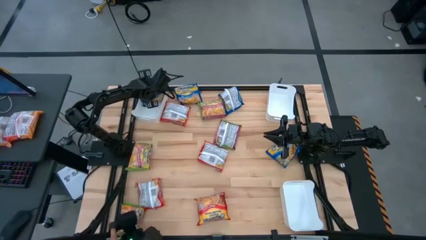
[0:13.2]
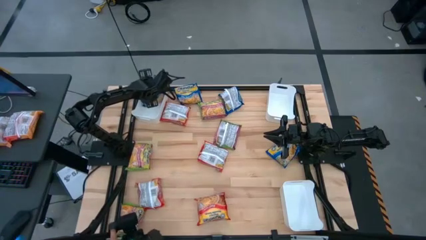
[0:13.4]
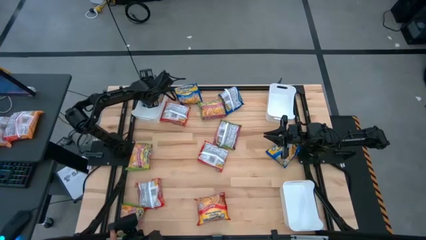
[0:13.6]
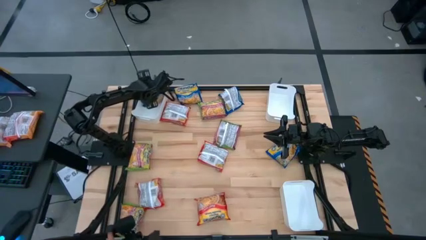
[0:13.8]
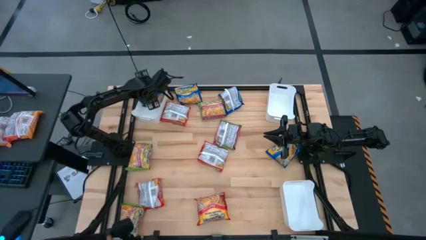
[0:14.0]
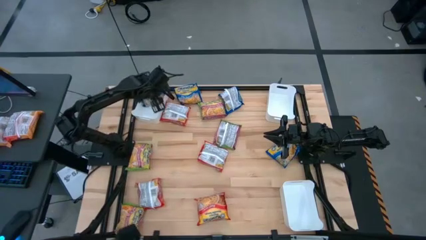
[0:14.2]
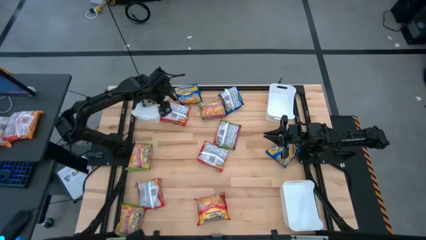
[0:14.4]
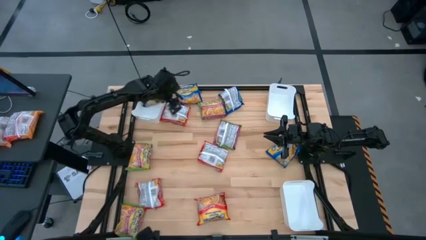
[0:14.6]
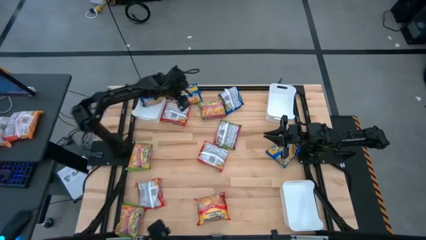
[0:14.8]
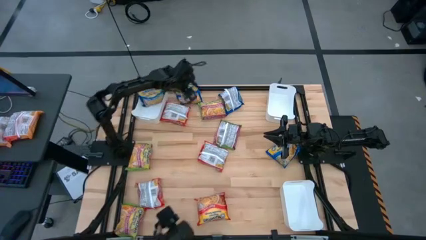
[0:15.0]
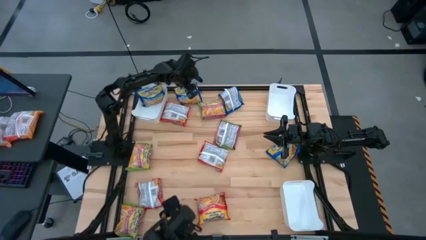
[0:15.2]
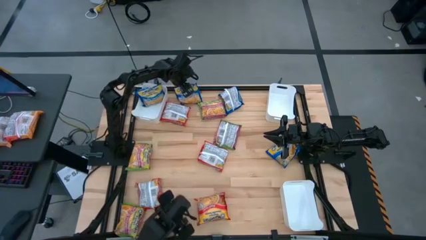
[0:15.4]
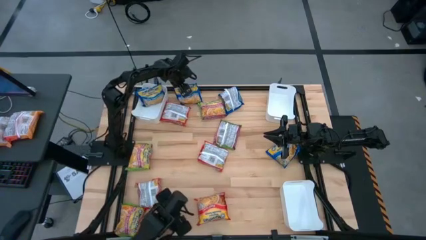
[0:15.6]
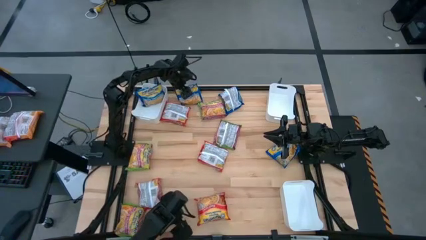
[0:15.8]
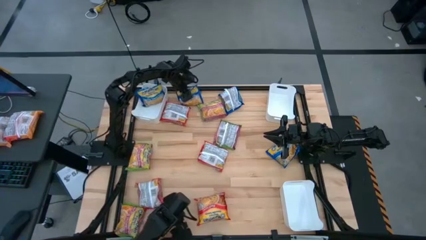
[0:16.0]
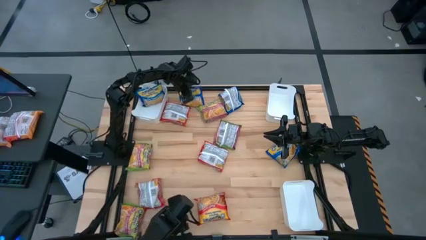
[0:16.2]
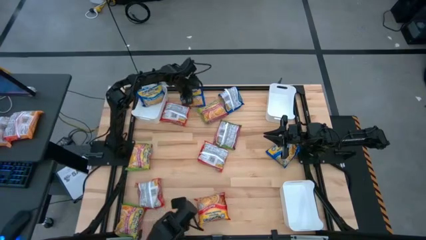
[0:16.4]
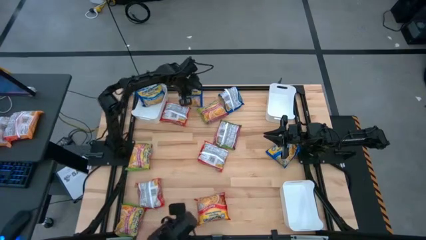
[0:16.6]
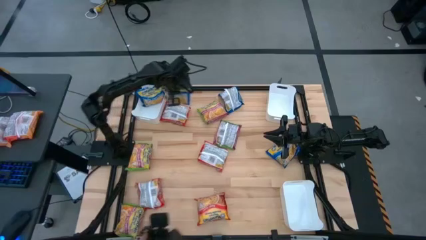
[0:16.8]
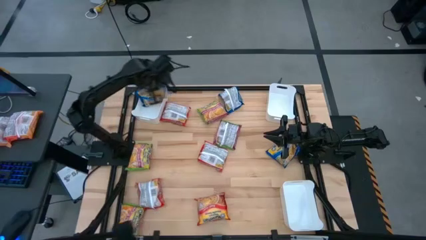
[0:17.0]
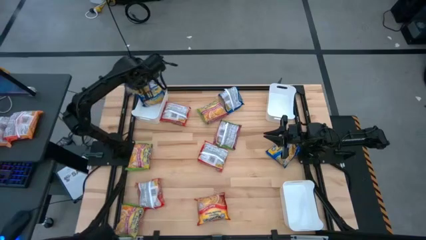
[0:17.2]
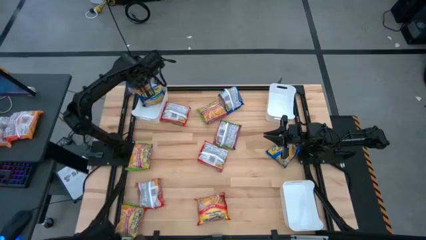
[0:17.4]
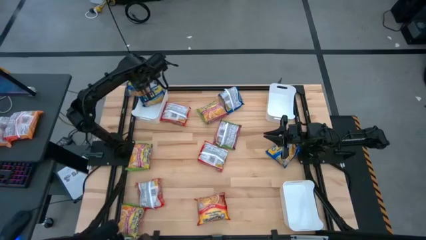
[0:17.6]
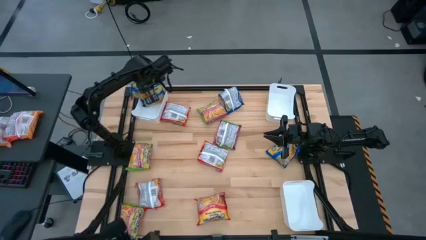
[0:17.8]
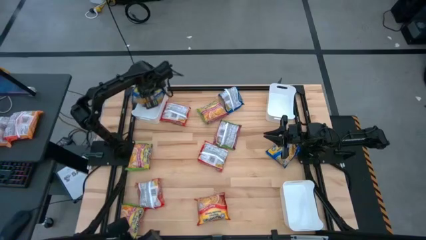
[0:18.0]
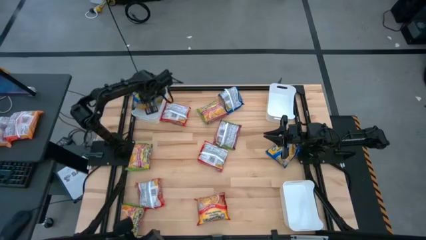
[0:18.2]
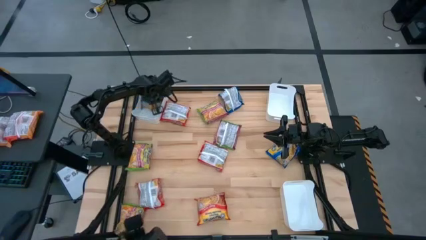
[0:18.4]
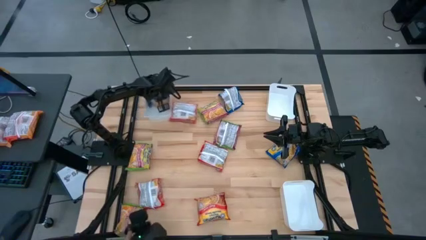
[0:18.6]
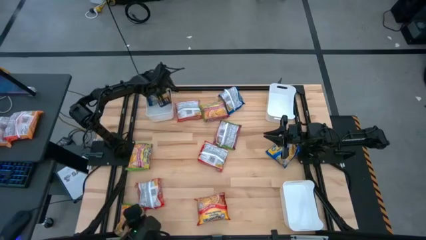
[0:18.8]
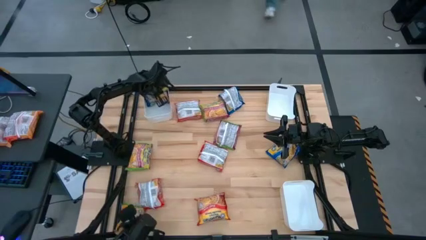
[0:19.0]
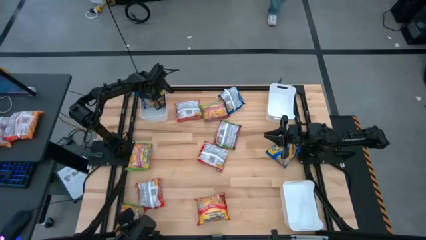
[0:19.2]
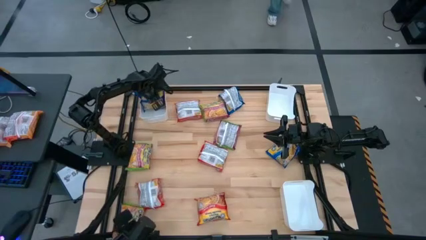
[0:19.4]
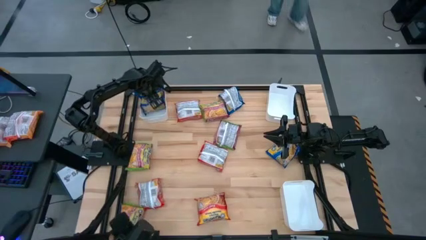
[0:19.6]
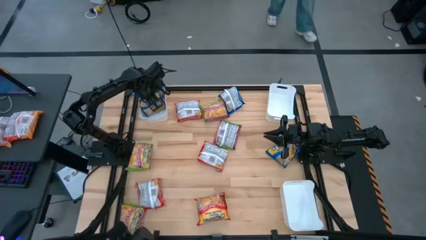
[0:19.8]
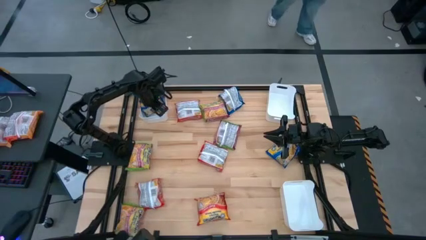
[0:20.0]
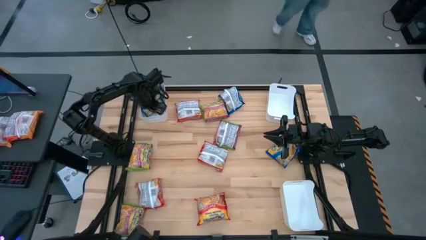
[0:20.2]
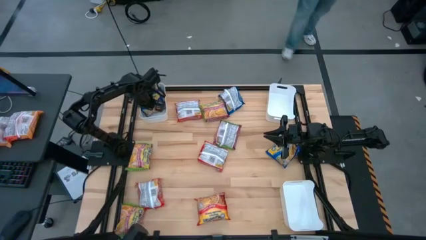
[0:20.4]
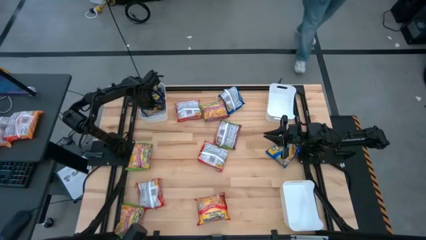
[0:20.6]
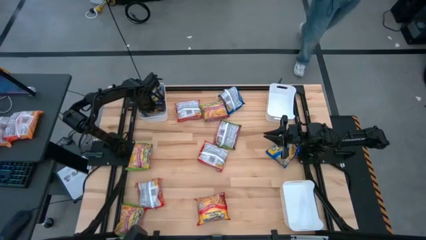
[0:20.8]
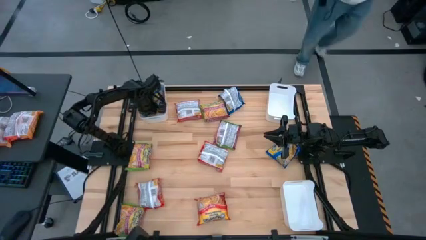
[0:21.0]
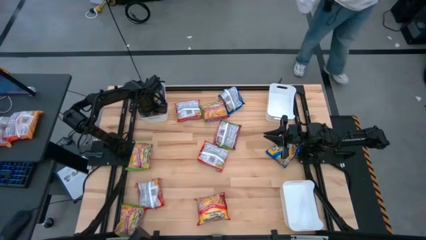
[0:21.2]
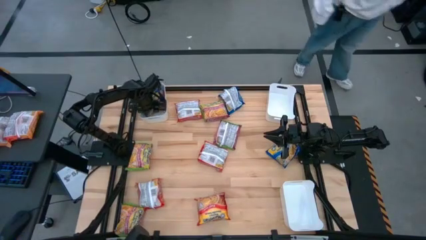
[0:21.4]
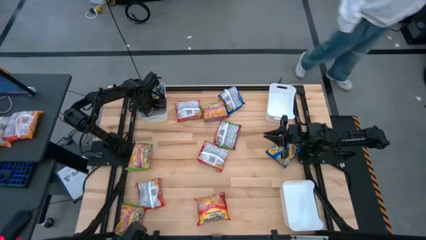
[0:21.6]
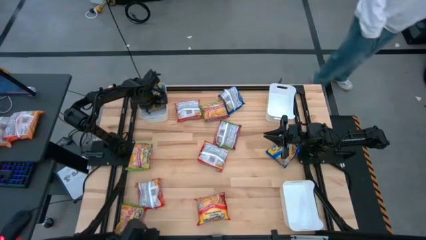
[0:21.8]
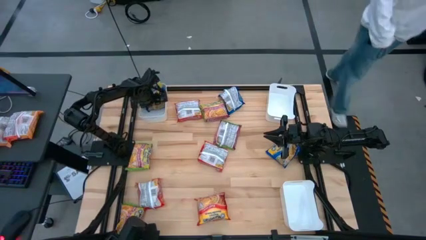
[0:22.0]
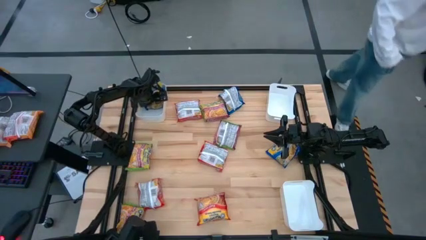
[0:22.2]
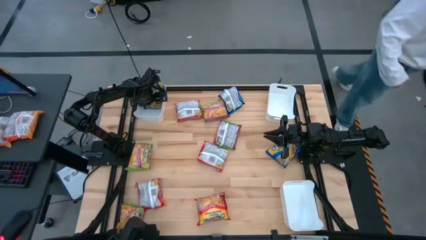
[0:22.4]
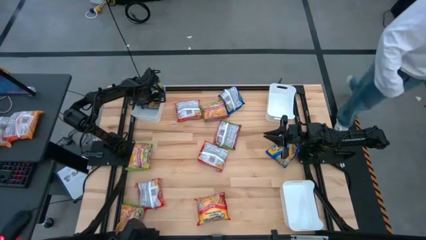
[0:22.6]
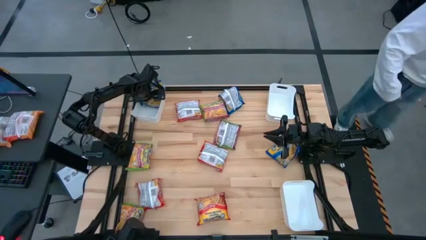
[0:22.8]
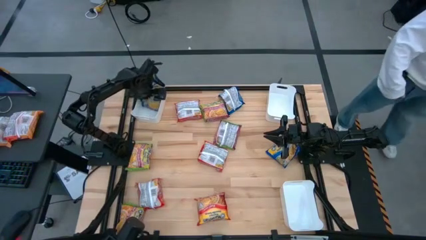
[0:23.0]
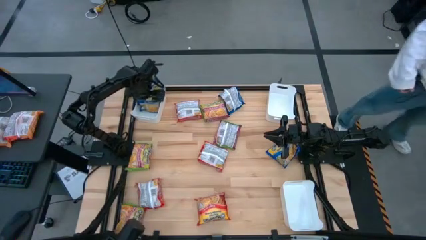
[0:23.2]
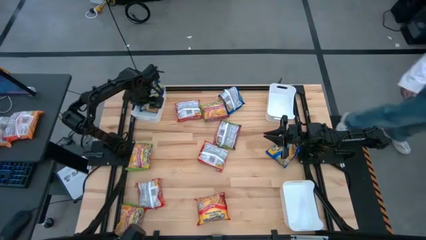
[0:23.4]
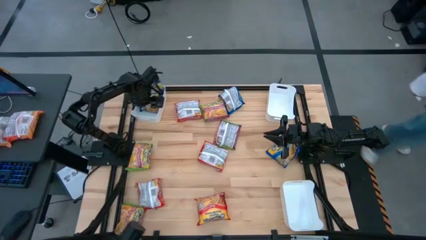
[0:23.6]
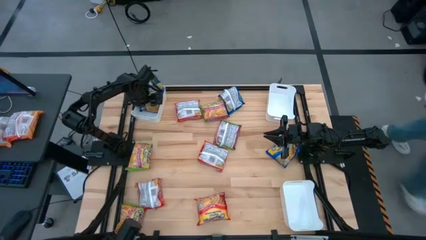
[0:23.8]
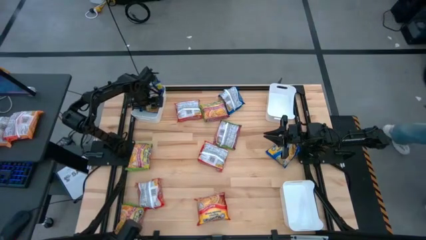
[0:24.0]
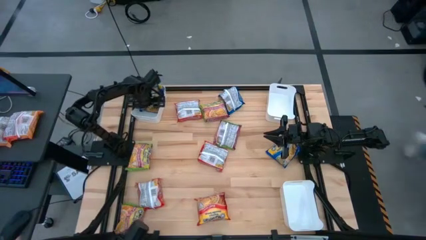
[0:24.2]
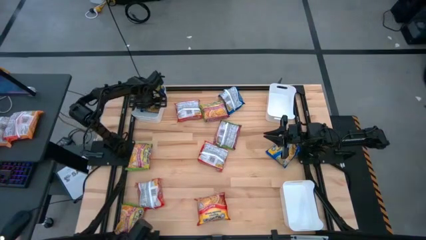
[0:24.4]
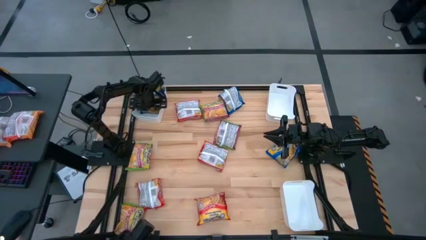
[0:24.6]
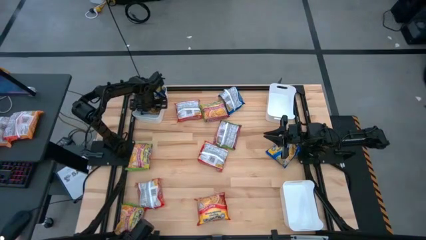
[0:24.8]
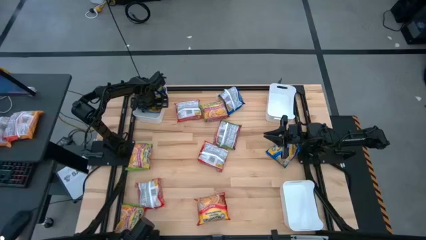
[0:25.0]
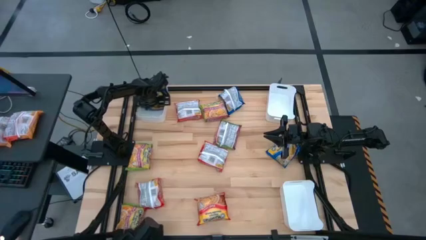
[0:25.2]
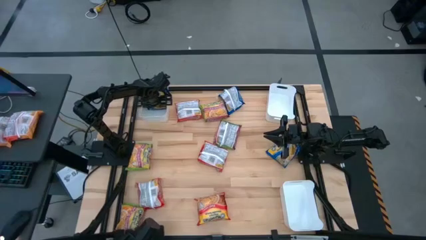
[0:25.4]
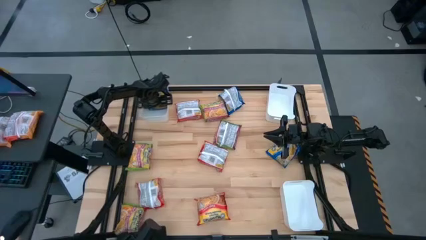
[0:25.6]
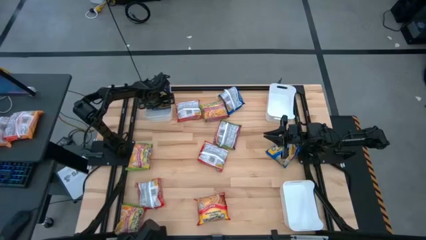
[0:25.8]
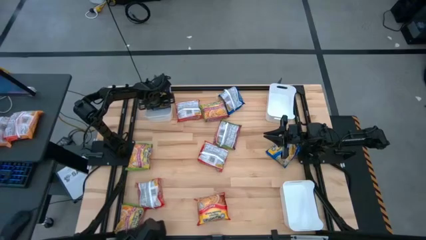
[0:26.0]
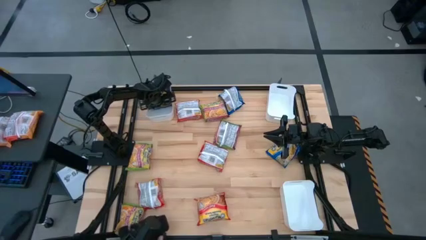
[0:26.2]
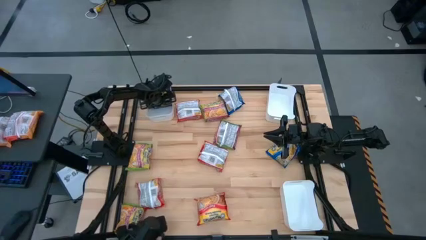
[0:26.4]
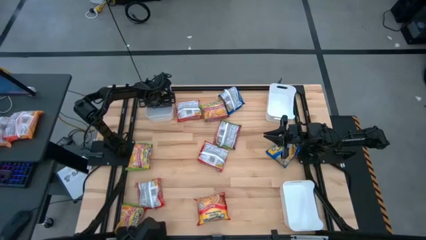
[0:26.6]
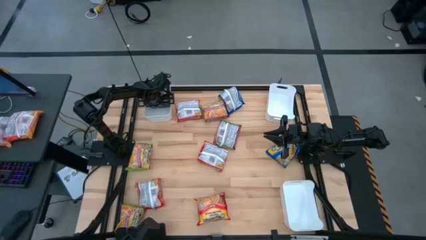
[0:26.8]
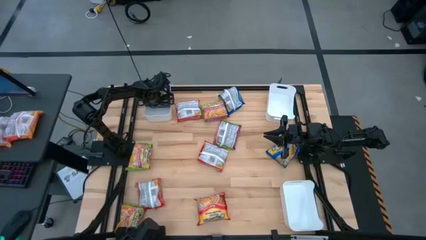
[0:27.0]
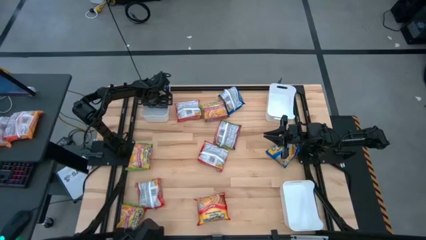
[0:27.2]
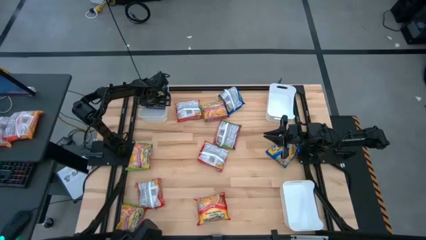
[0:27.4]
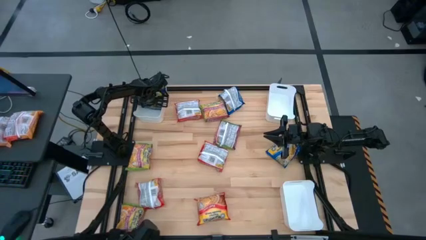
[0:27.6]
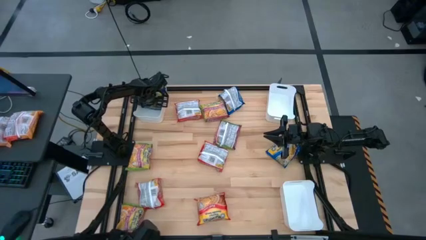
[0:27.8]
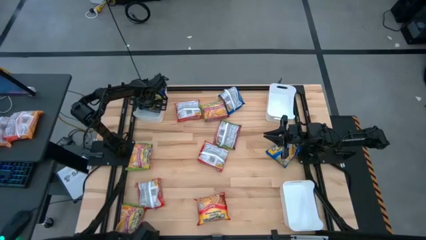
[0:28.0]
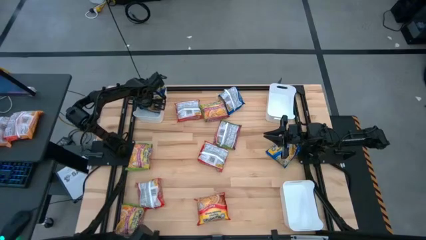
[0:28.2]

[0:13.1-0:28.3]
Task: Sort Maruchan noodles
Put the blue noodle pack into the top left white bin

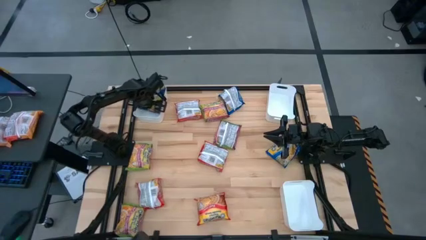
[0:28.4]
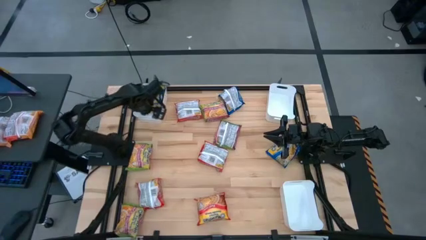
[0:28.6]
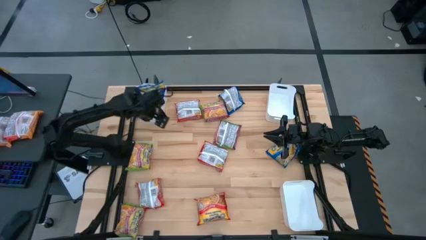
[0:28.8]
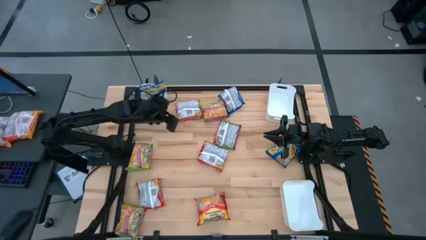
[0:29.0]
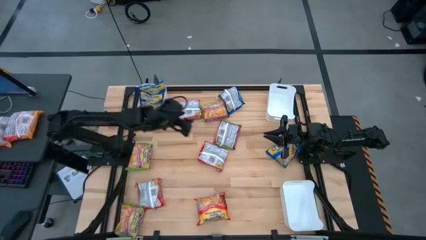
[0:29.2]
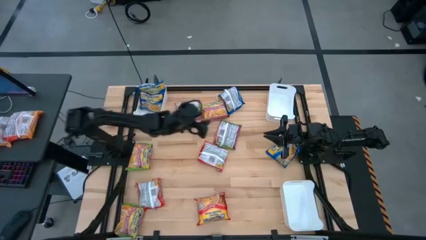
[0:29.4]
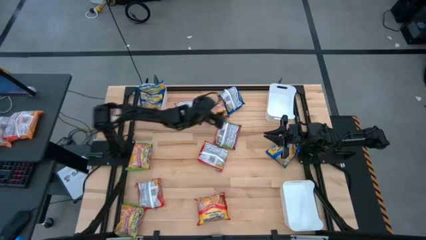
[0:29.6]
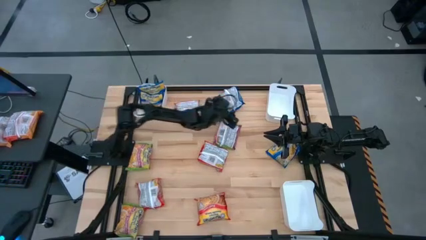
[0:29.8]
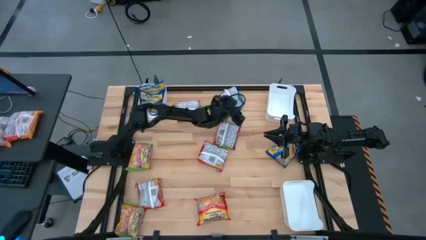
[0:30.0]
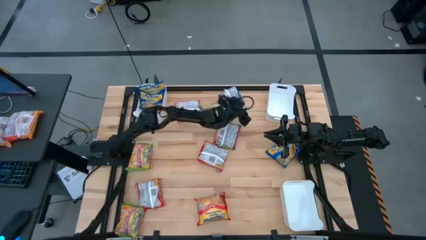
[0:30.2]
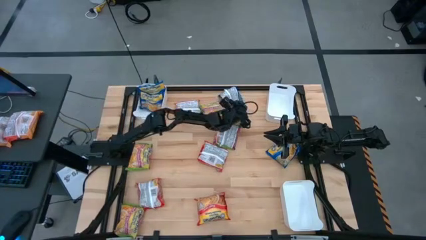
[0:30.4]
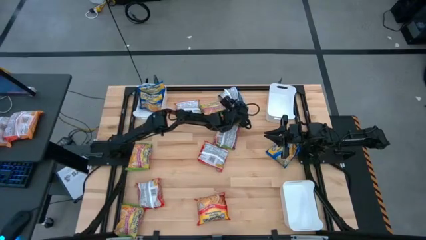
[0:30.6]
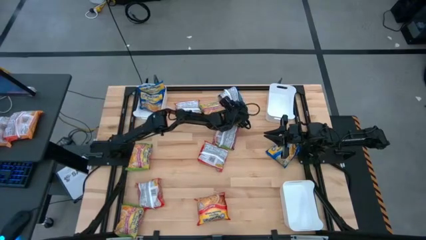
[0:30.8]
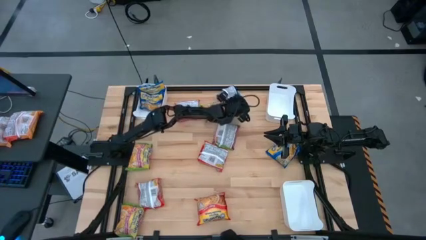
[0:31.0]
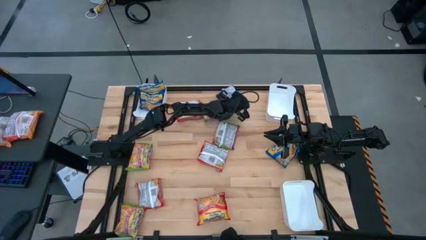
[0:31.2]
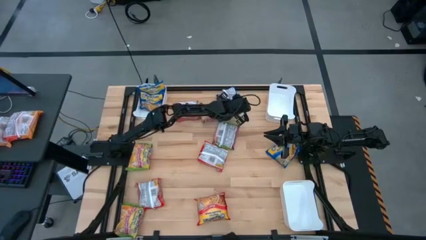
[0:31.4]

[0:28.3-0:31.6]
Put the blue noodle pack into the top left white bin
